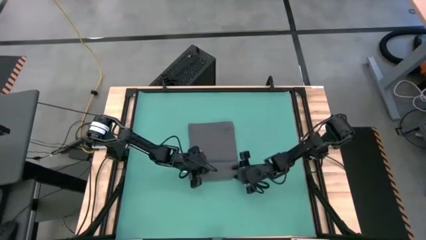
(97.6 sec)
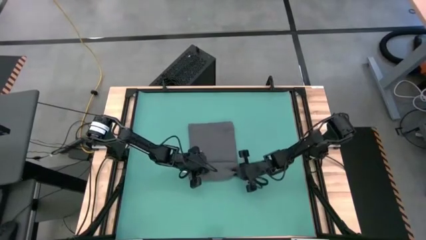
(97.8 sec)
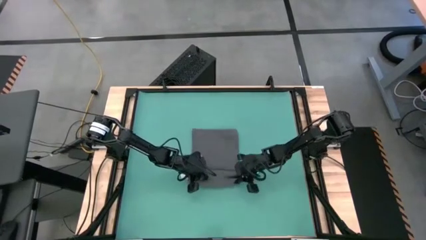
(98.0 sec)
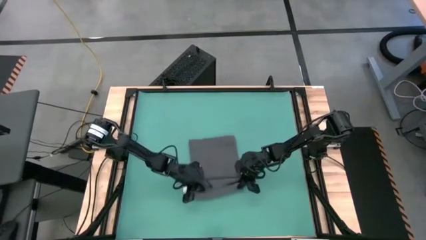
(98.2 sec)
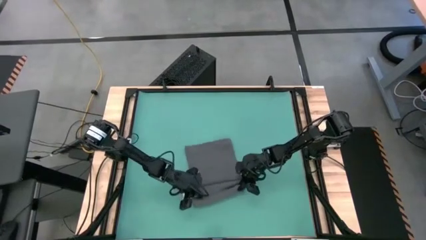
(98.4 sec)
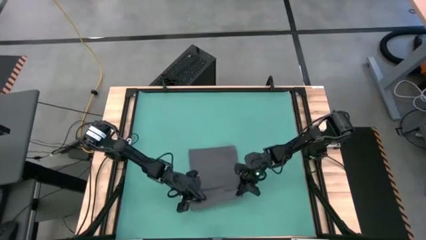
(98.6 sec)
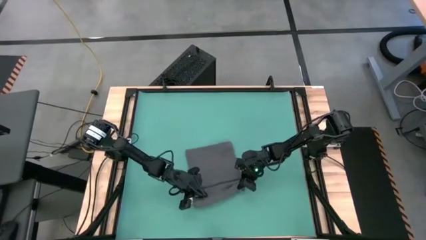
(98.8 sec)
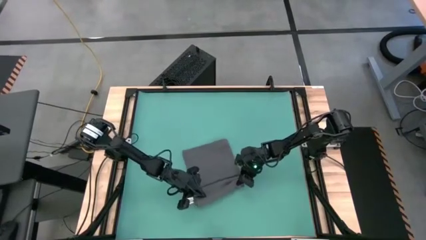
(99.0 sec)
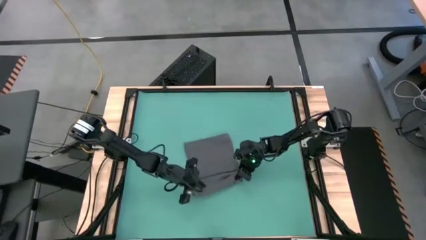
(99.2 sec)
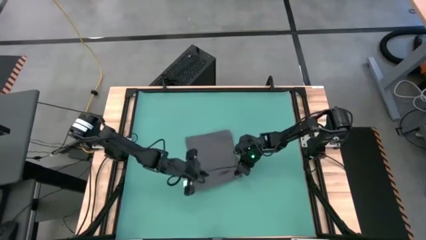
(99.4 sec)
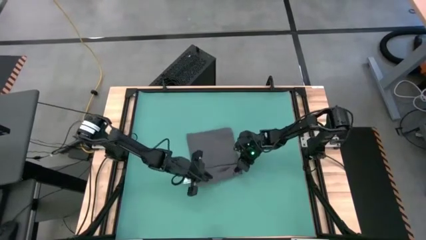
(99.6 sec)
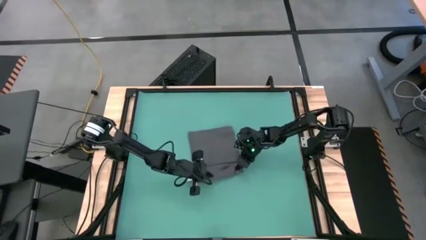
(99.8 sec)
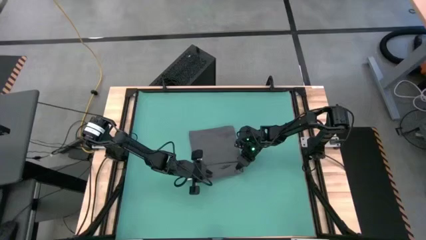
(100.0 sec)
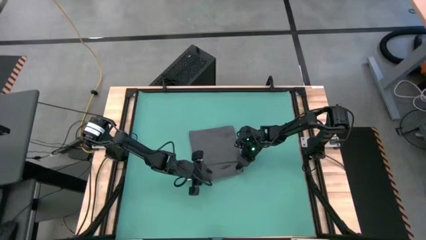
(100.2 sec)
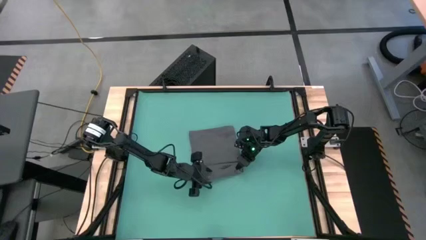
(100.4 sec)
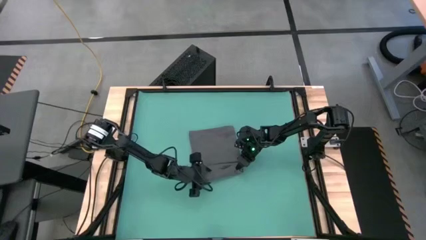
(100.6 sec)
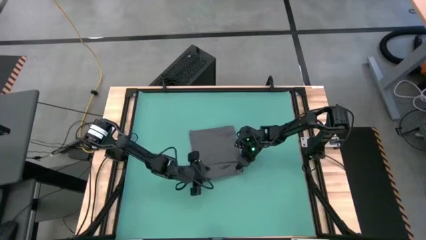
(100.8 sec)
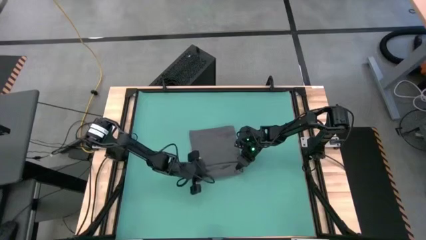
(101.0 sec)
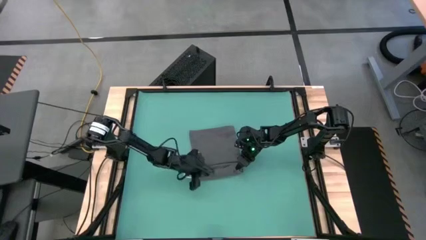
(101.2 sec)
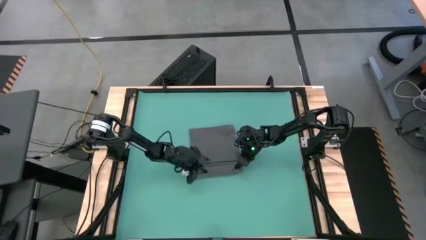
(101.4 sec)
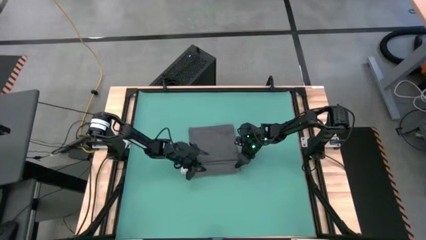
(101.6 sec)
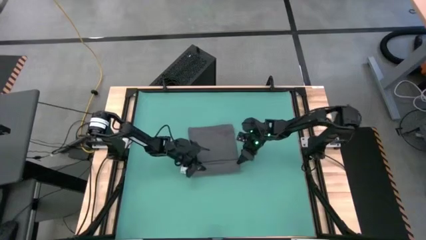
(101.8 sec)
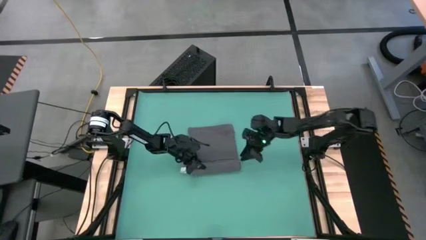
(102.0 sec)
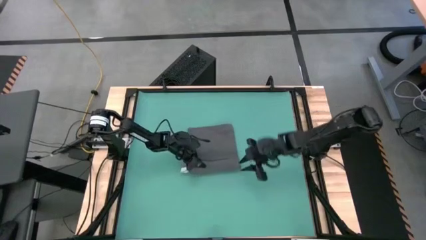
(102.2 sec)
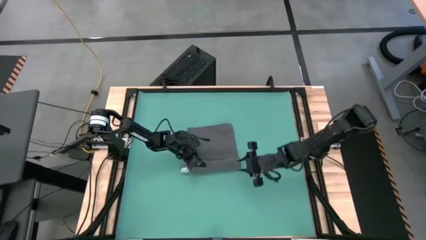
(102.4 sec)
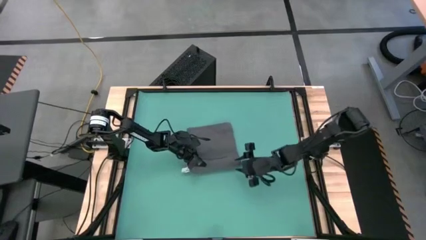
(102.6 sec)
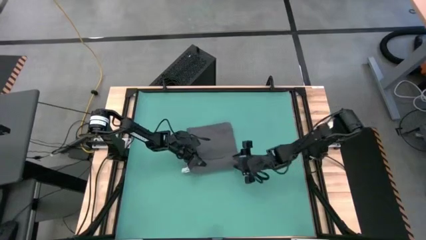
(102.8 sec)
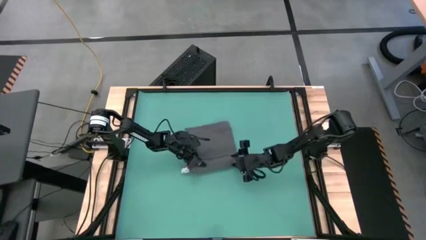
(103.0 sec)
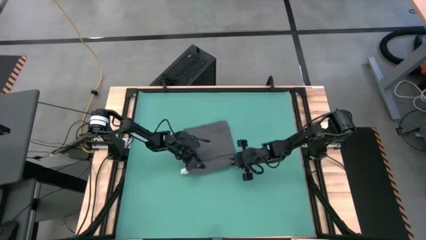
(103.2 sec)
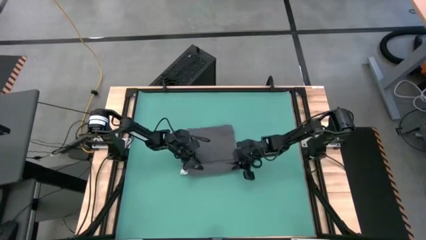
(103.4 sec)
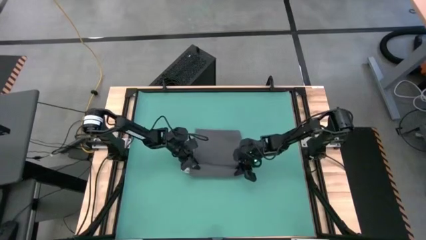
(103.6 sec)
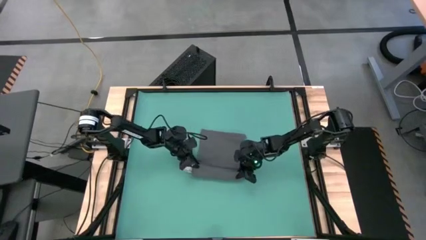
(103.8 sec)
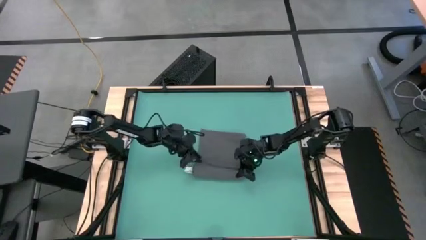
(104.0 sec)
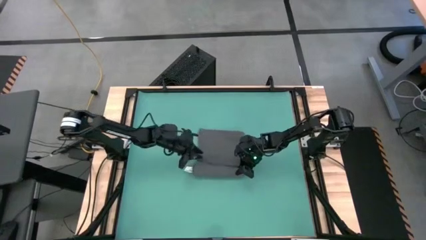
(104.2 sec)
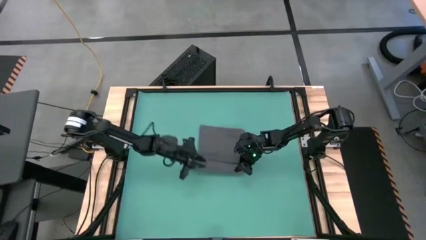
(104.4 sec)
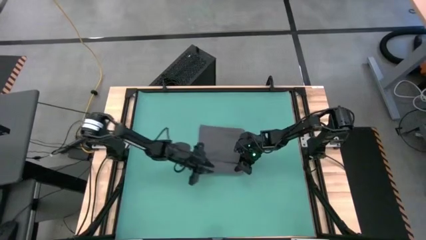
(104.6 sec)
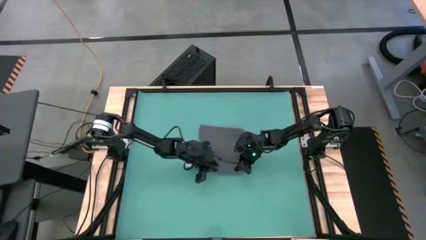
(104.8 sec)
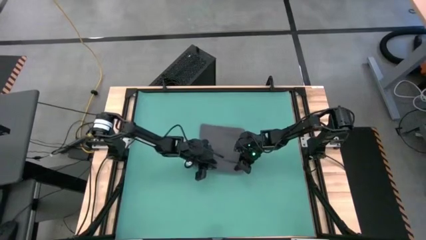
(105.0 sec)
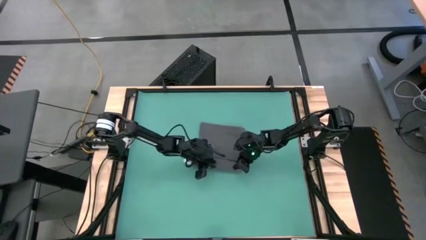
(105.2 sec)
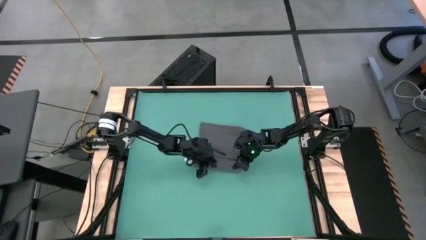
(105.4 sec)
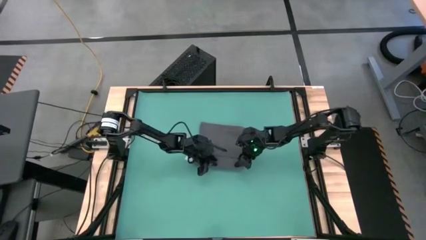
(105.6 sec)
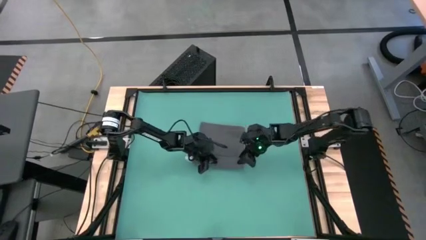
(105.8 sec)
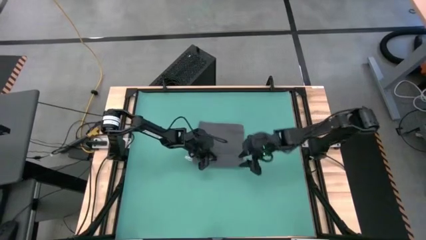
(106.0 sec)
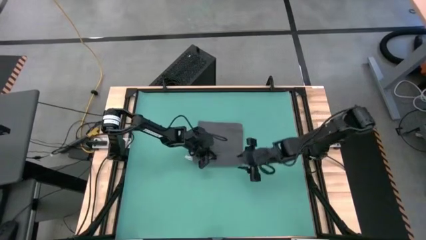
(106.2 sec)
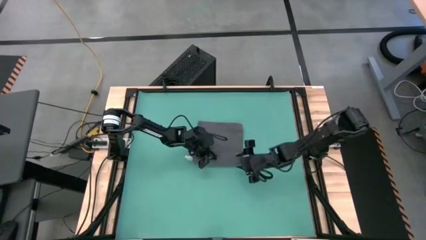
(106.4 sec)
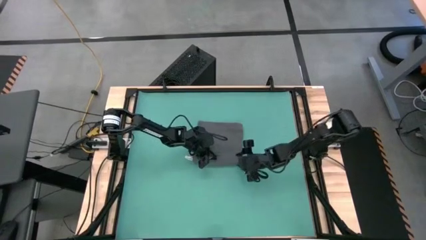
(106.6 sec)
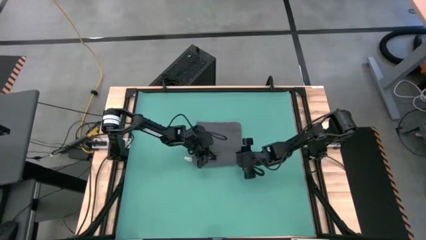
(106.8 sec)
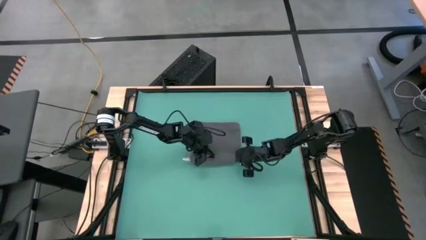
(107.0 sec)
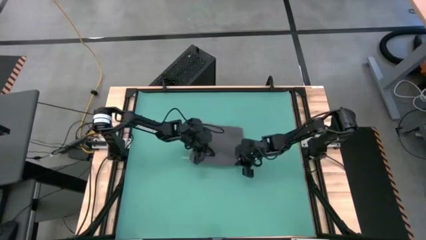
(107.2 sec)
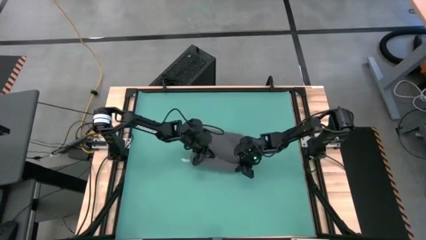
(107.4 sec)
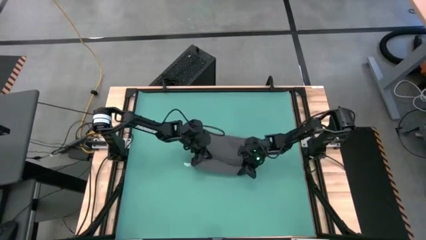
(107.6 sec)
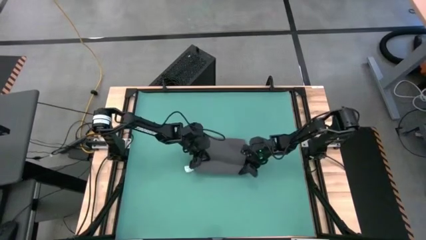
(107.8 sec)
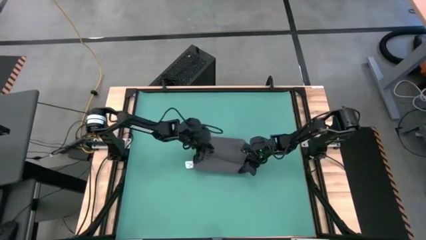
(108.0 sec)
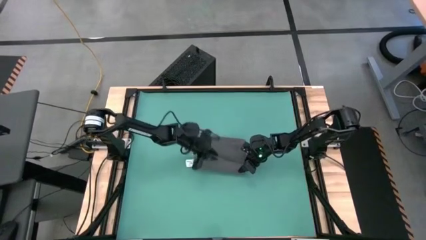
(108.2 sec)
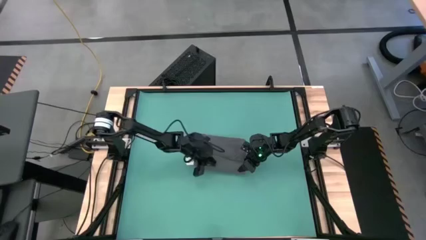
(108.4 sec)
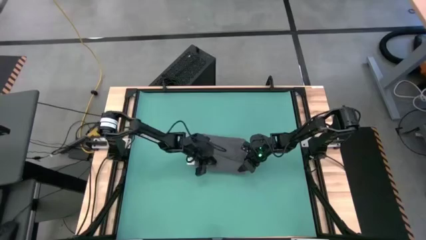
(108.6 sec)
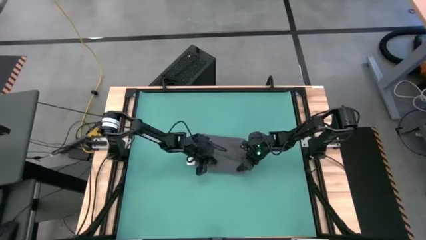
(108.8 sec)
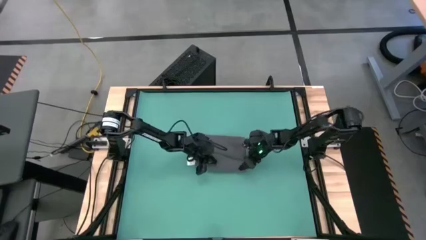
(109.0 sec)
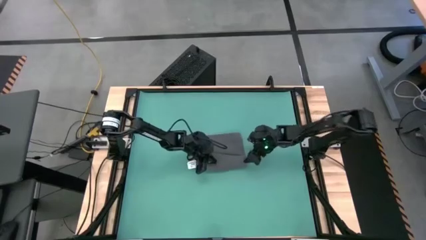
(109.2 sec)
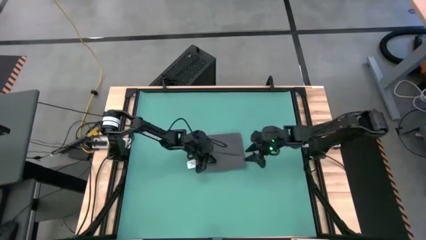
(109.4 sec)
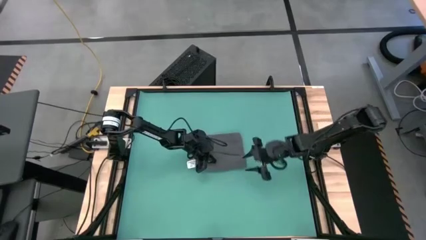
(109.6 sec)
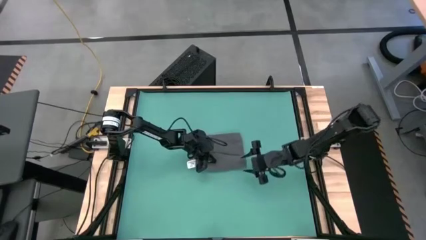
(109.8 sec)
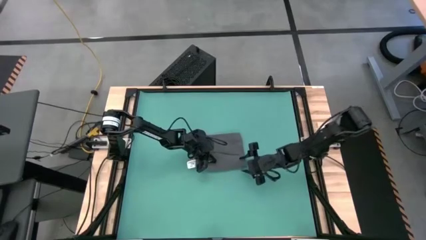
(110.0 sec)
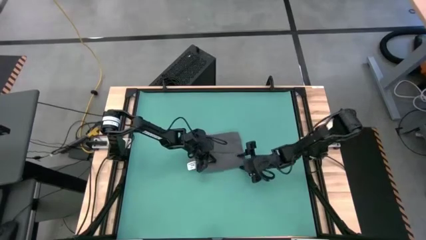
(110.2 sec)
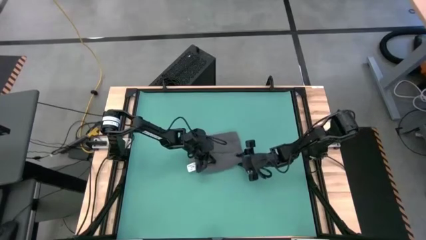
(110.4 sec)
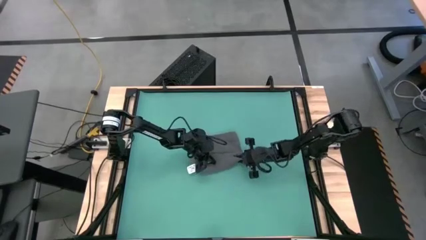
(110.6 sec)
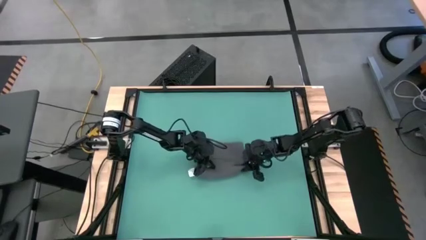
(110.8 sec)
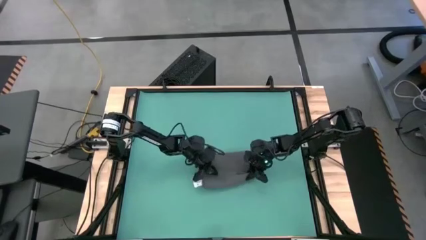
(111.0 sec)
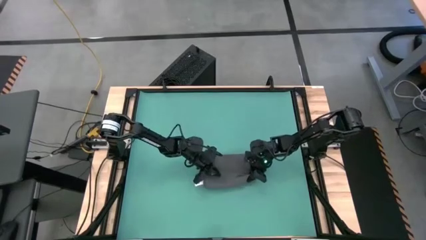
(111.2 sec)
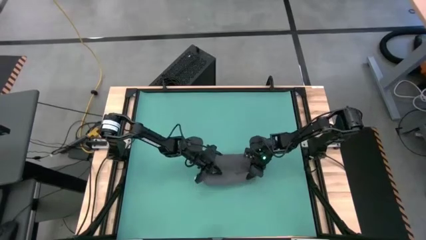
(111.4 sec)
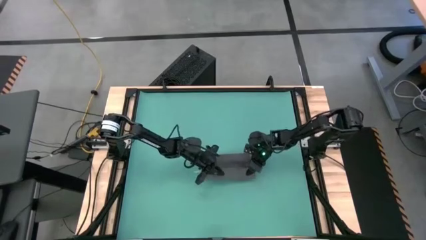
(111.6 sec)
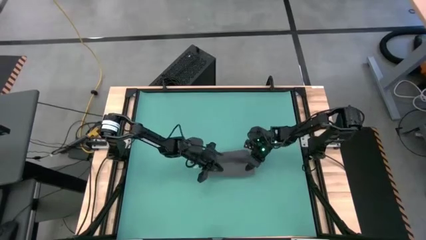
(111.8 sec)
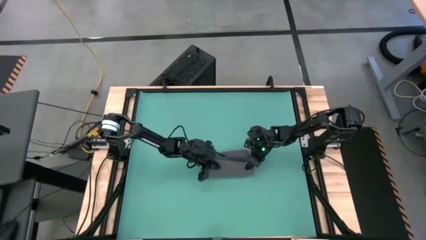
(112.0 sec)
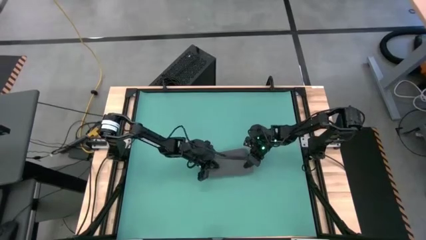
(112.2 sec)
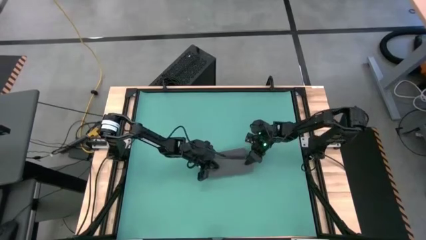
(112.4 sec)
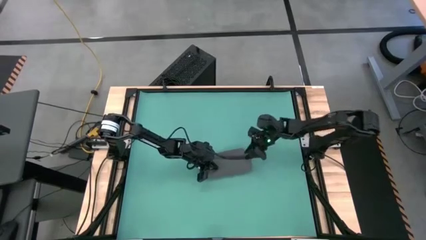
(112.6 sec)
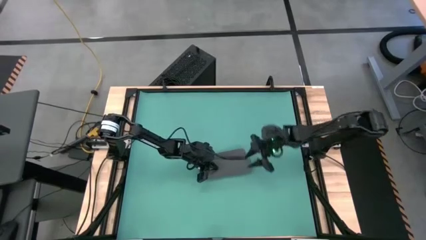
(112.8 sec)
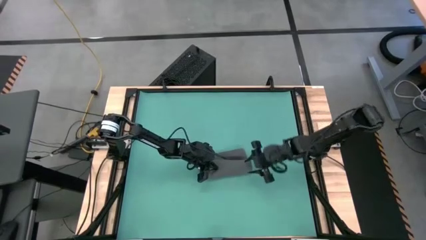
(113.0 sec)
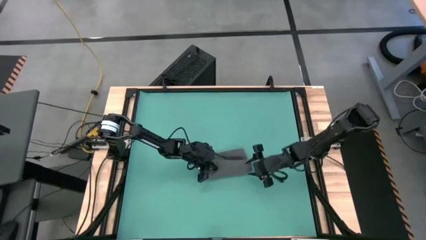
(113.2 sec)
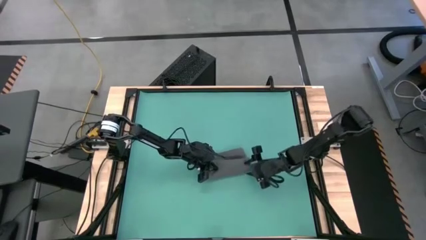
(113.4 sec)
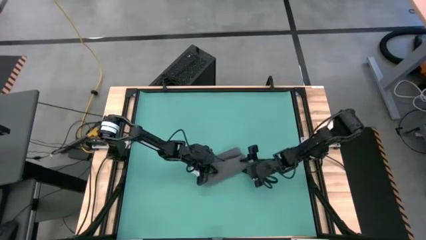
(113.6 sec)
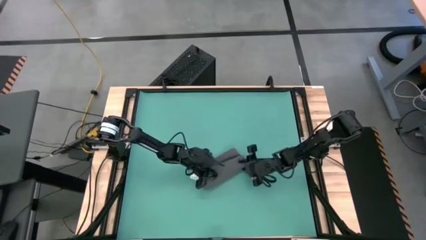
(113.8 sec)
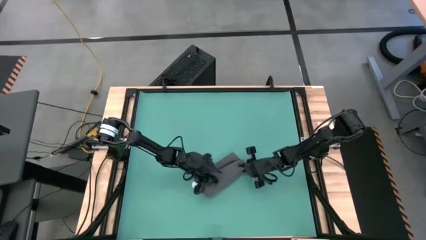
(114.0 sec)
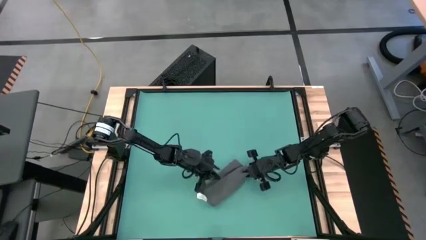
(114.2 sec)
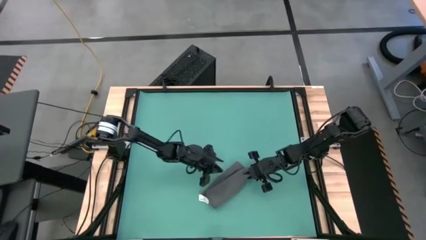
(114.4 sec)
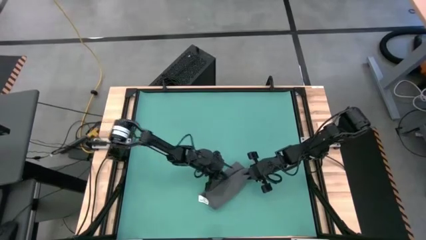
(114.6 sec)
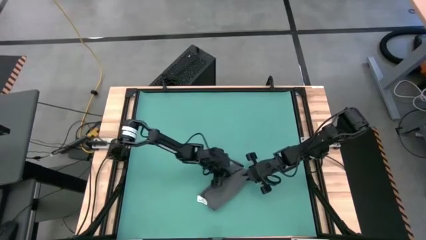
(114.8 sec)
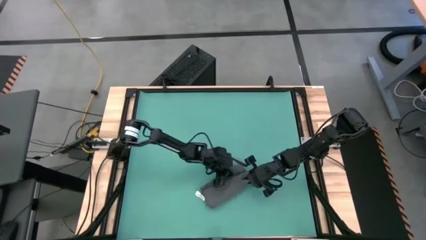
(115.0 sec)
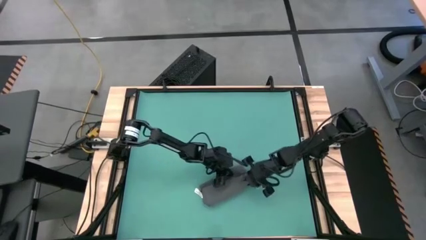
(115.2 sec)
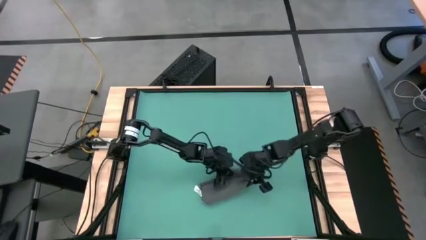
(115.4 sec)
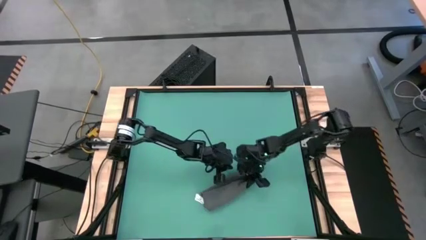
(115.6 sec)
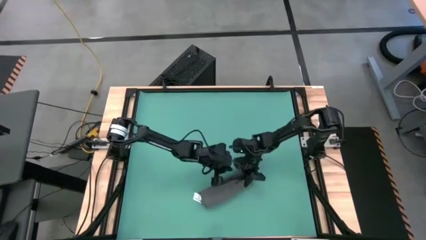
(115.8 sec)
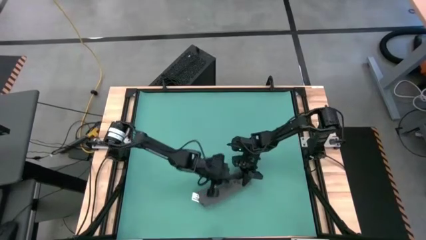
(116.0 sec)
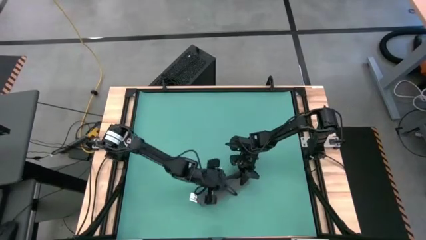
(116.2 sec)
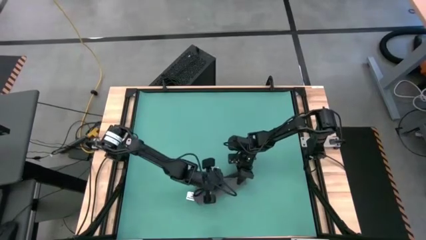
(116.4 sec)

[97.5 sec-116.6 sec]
Task: Roll towel
Roll the gray towel
